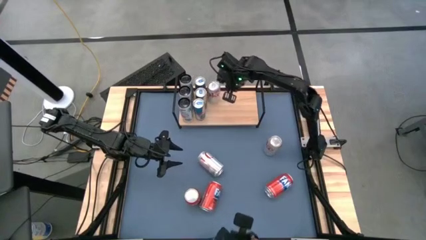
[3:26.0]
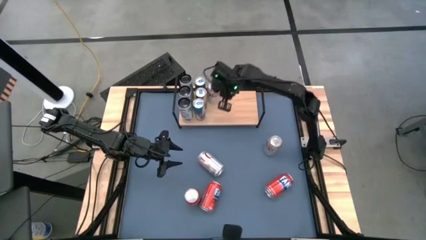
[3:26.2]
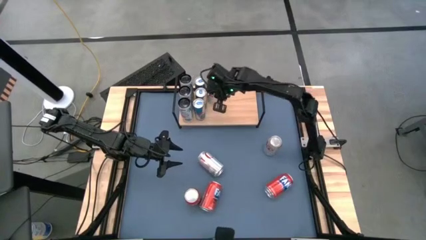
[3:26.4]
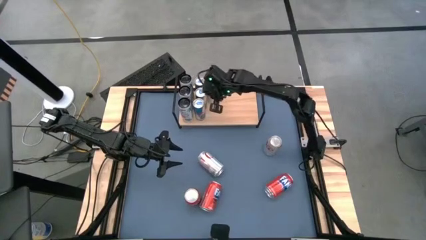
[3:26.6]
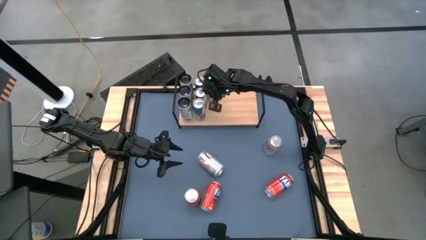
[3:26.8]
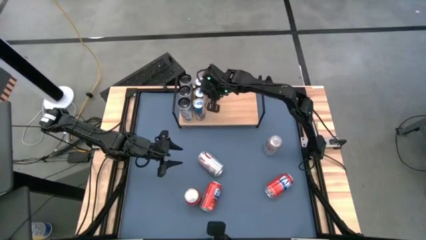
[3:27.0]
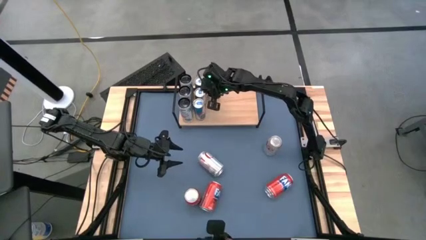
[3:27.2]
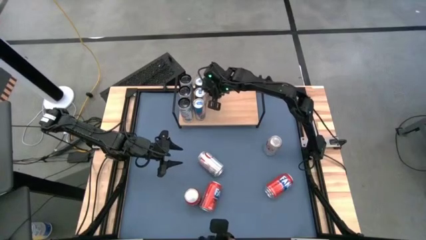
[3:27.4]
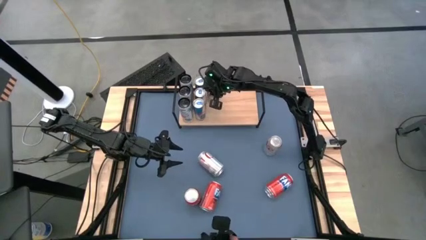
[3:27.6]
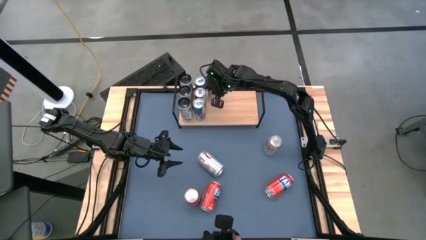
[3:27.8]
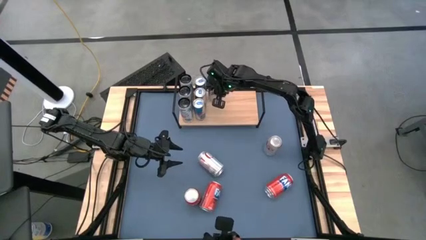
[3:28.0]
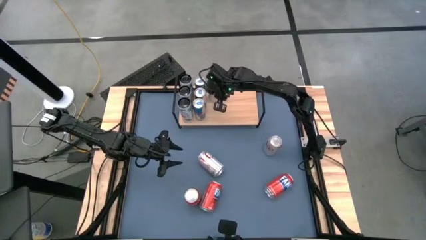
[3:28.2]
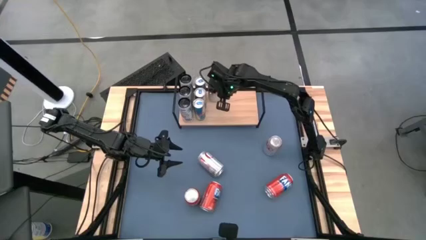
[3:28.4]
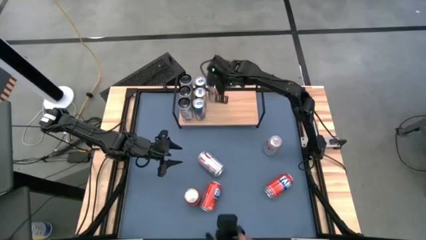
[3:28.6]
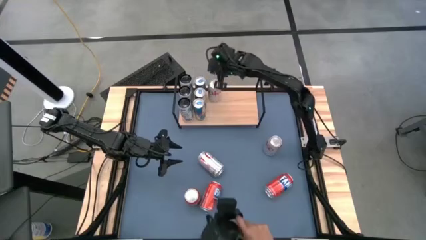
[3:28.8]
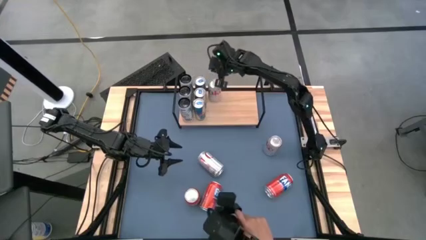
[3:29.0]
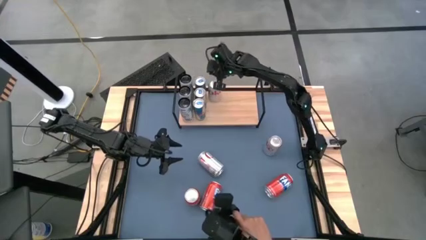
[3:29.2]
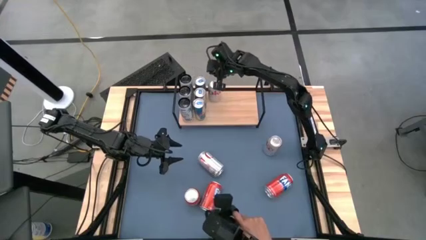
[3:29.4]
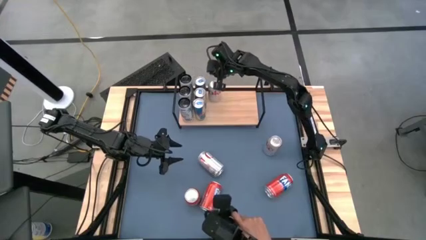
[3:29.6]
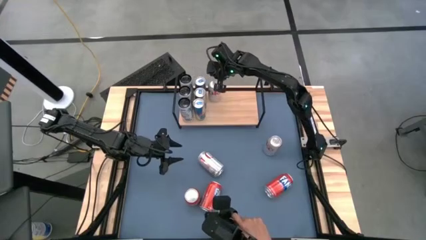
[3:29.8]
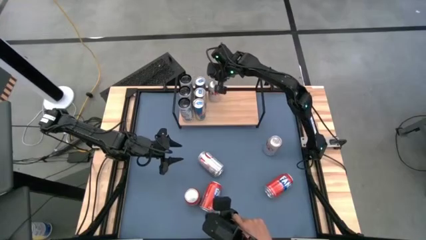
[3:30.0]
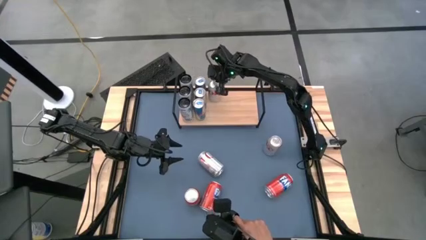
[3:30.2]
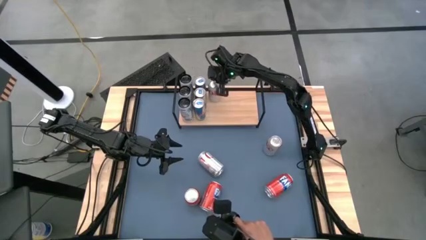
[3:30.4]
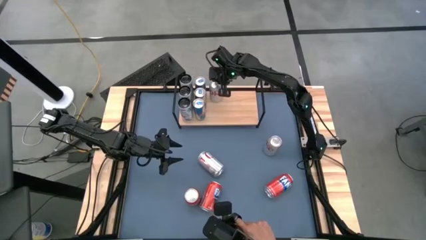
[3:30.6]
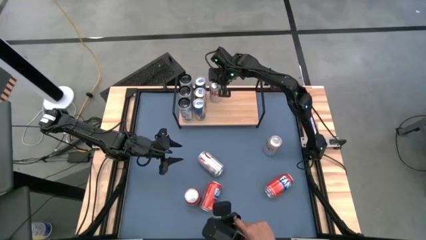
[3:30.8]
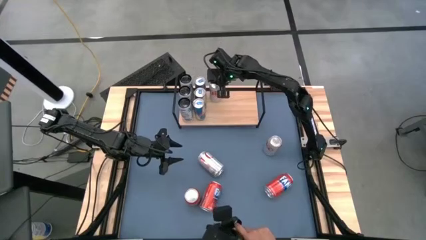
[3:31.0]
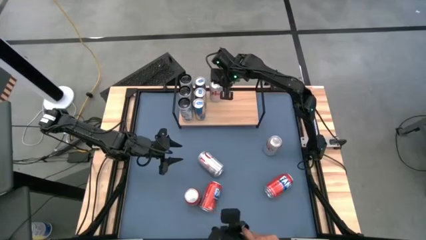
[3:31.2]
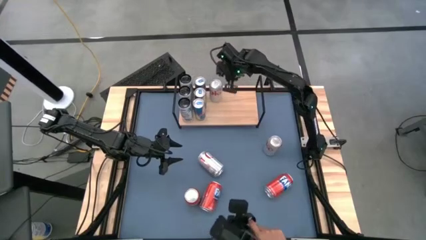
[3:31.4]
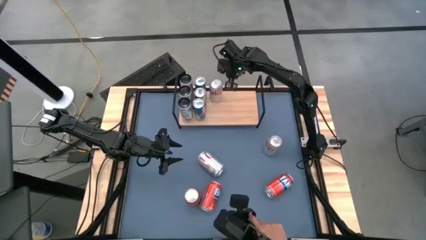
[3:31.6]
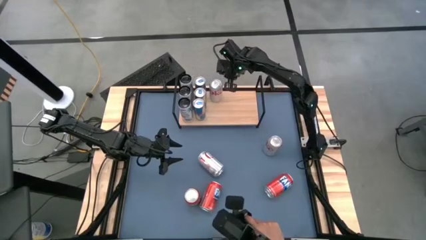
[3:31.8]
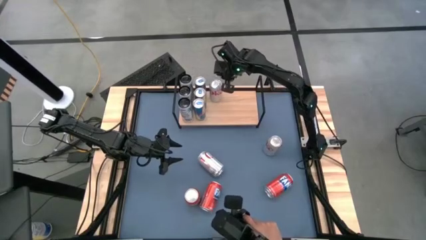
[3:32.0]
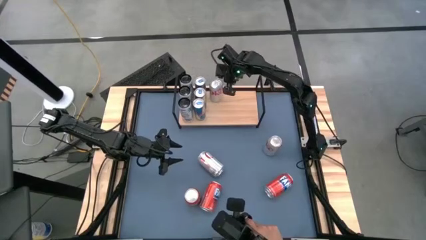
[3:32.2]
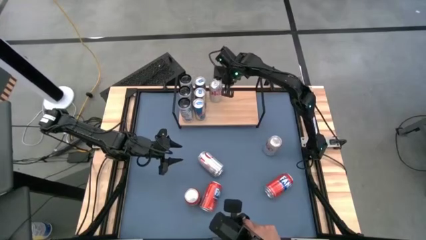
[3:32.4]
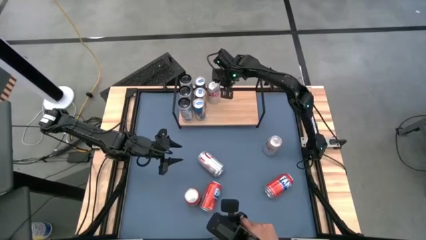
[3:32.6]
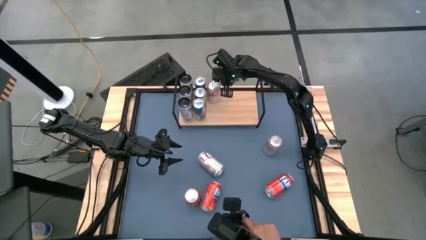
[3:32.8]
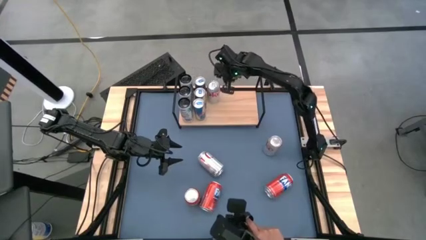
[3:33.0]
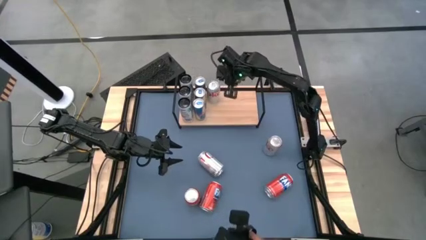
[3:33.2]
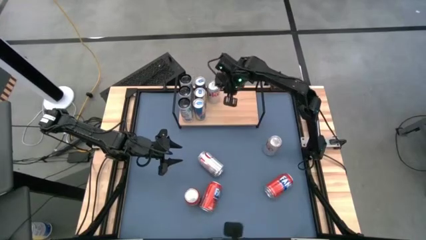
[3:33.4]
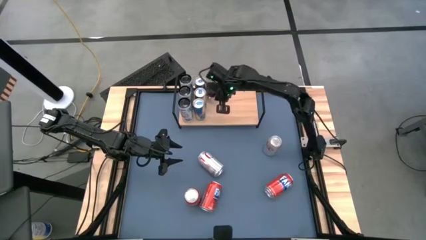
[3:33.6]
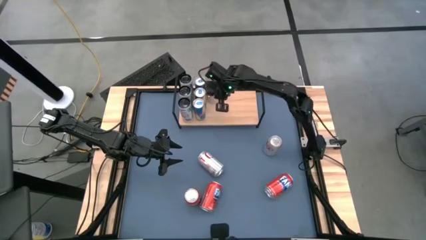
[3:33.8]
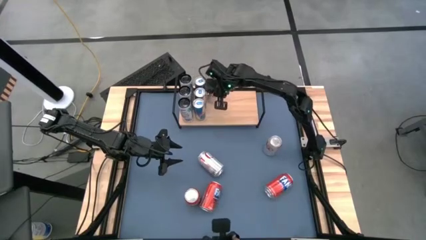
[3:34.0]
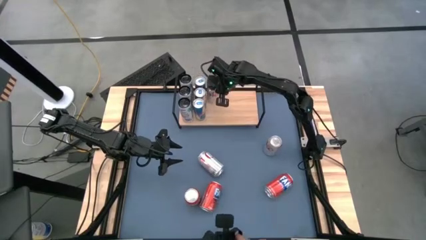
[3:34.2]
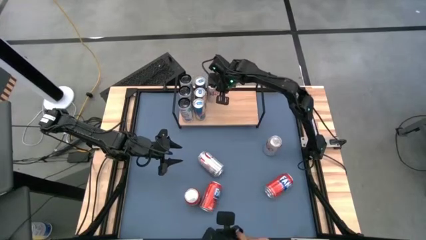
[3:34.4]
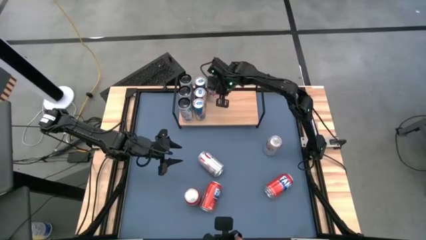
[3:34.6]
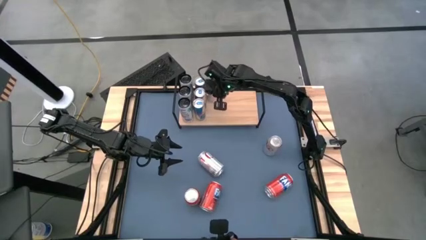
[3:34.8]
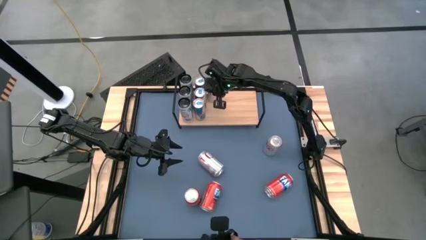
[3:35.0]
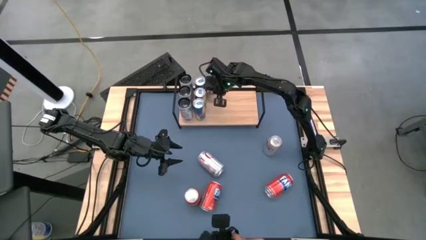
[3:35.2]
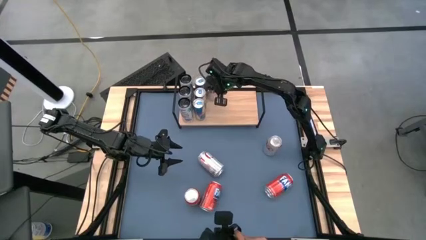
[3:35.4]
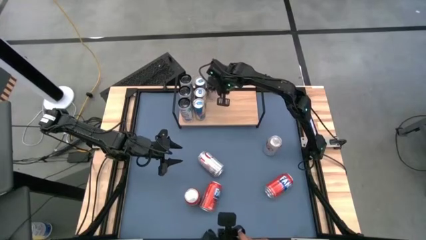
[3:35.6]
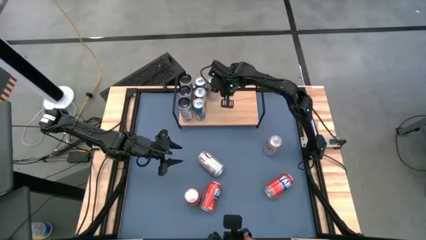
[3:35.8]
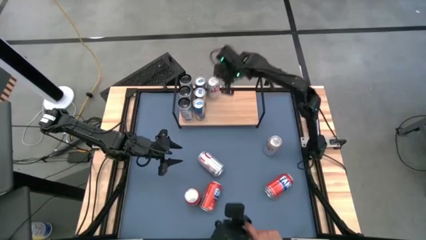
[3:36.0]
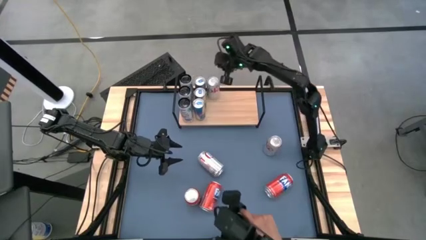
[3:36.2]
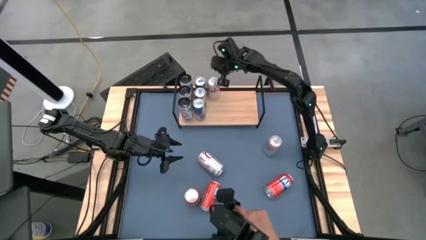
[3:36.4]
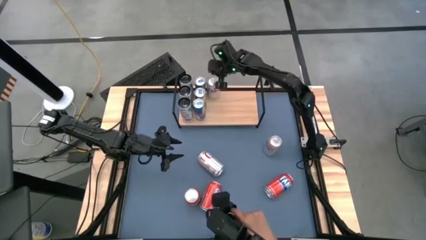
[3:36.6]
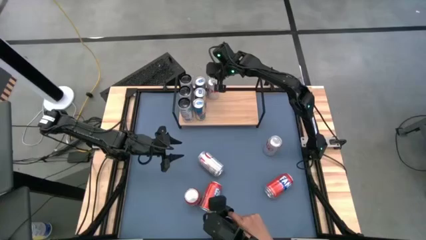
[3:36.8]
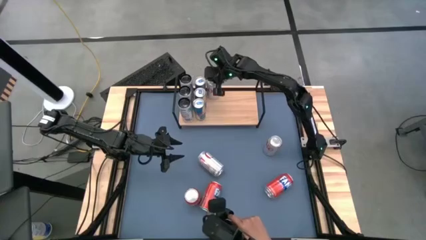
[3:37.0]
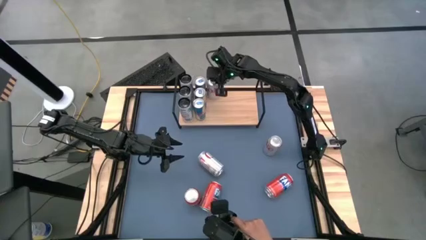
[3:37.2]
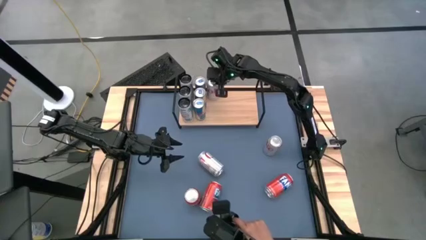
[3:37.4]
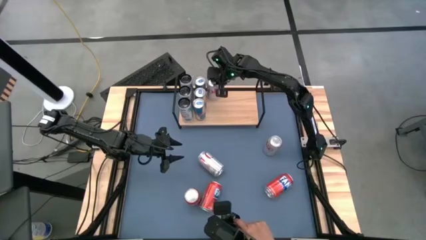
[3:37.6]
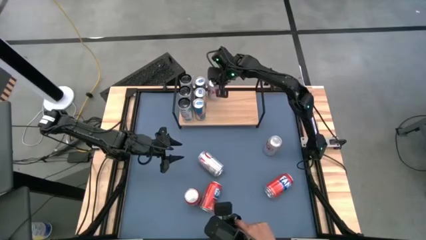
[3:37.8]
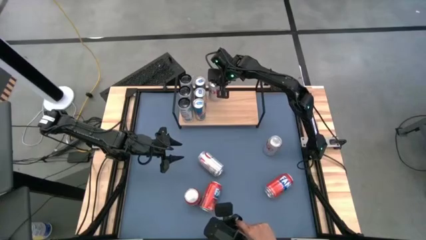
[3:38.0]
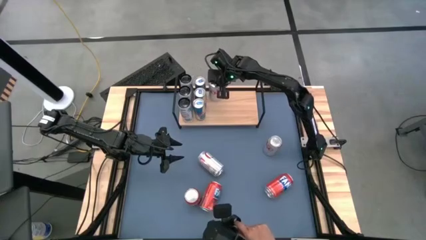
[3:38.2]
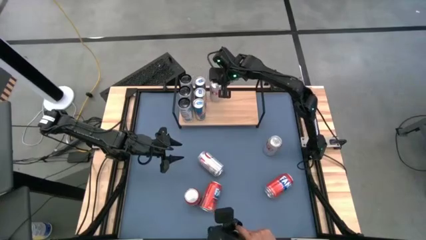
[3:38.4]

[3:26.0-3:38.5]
Task: Place canned beverage on shelf
Put the middle silver soda can on the shelf

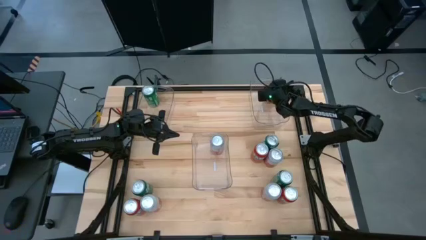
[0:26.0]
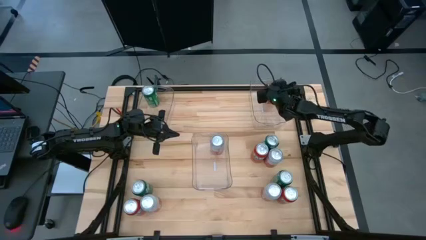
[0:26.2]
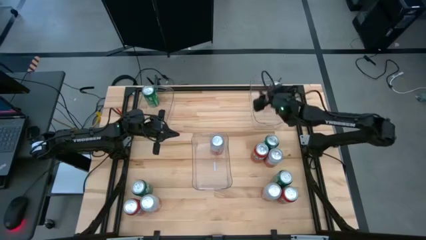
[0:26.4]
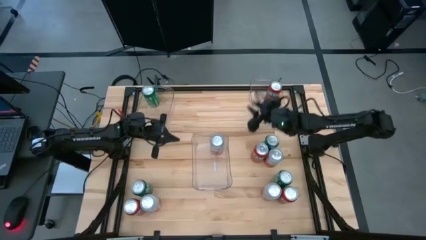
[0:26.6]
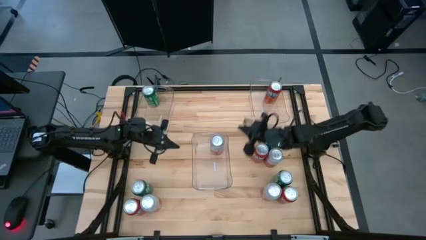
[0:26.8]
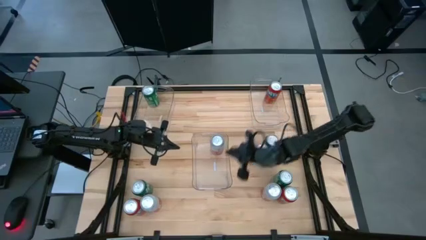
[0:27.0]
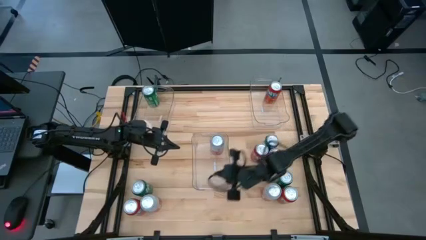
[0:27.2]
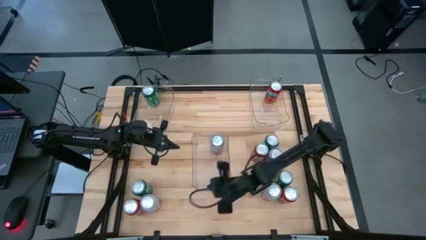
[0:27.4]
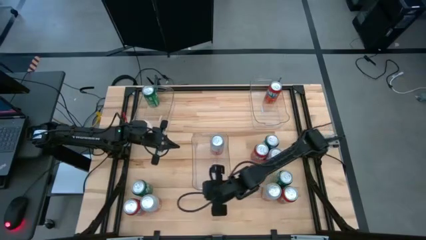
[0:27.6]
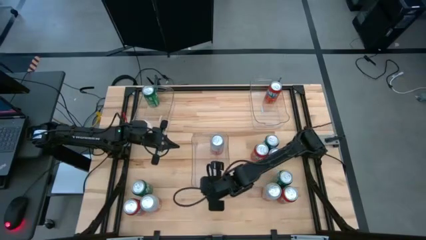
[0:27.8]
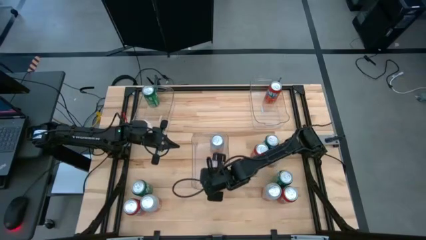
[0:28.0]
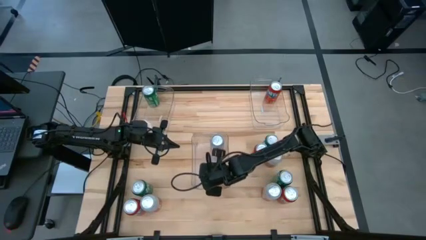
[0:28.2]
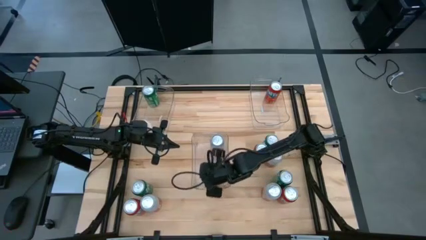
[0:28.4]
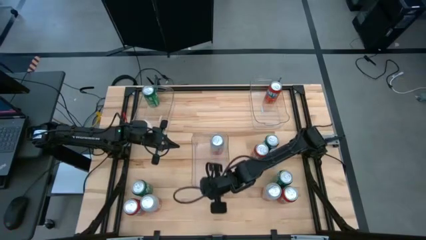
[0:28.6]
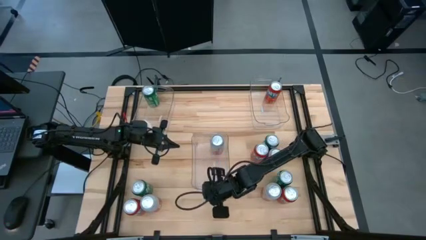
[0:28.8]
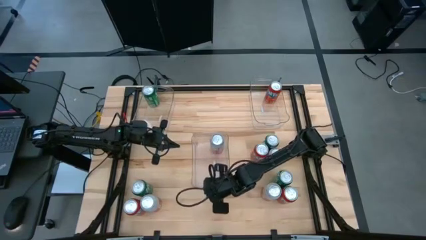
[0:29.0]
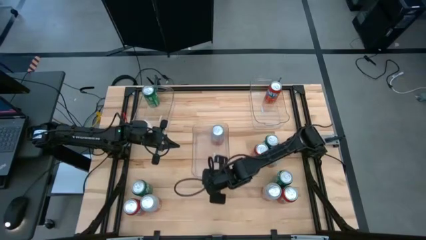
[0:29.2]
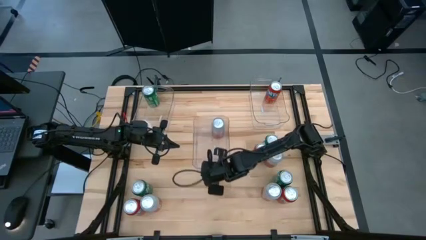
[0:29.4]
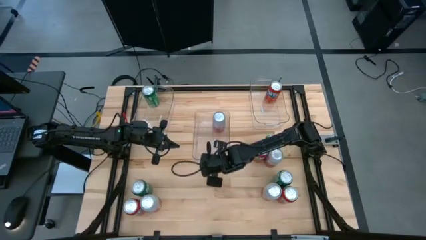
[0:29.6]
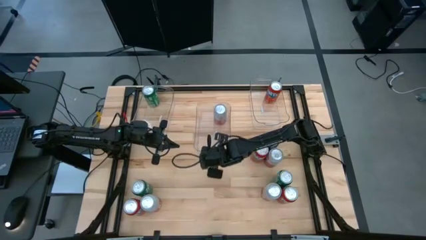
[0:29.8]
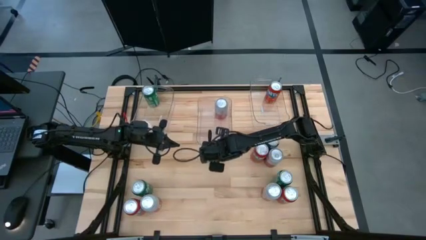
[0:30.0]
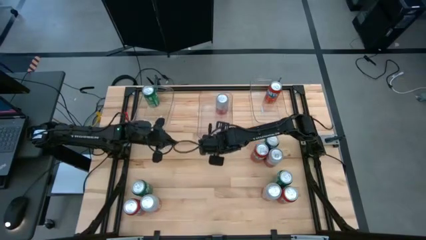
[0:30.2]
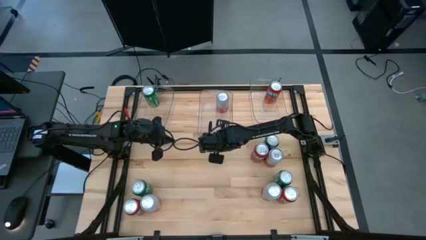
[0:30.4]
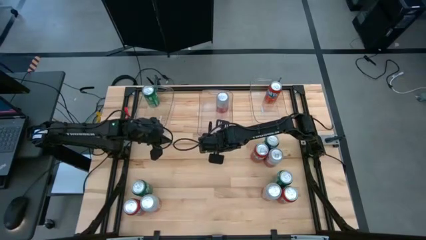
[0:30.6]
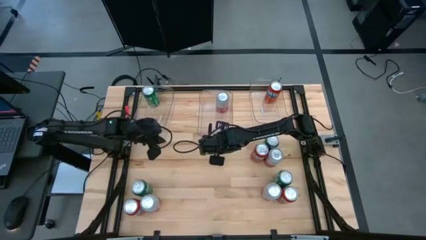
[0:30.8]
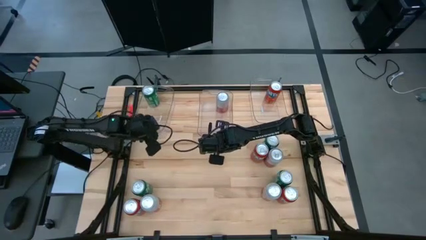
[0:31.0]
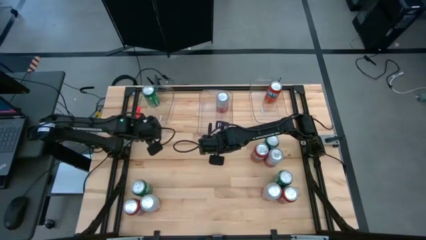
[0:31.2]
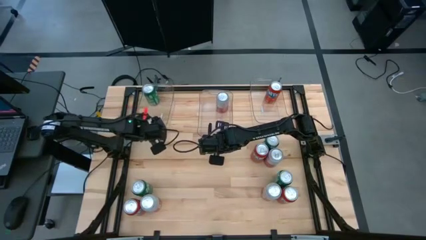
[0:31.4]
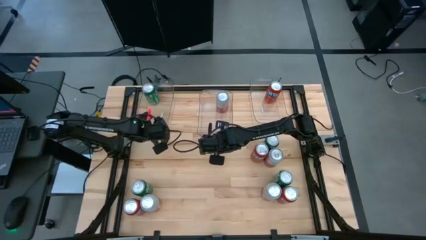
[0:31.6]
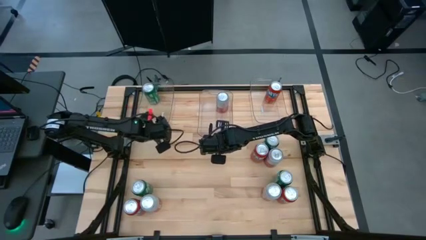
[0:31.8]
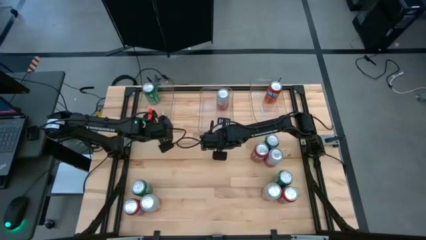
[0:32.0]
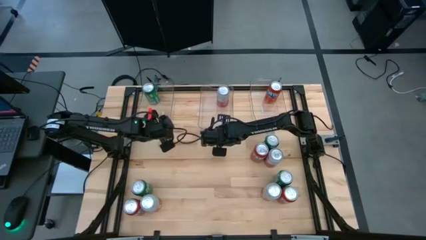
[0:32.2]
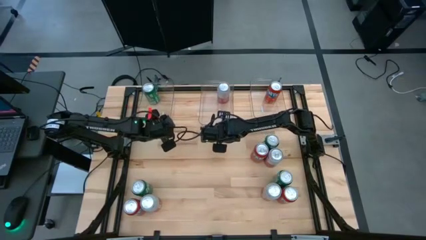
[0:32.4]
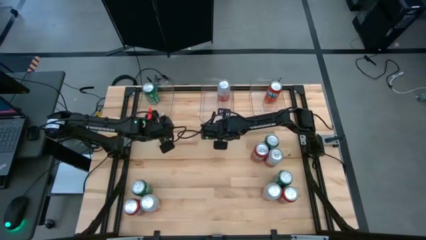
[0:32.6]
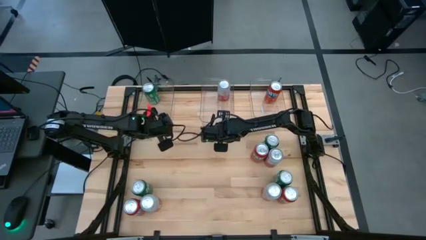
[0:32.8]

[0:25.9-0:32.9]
Task: Sort soda cans
Move the center transparent bin to the top middle of the table
